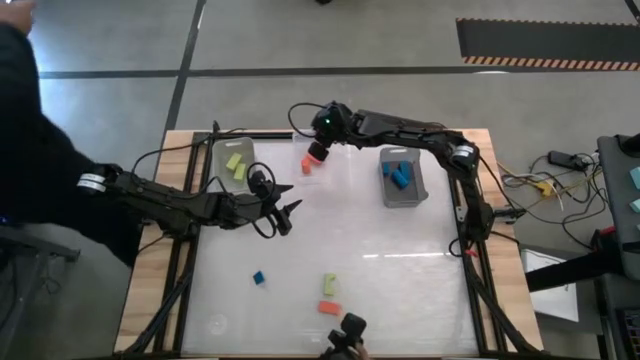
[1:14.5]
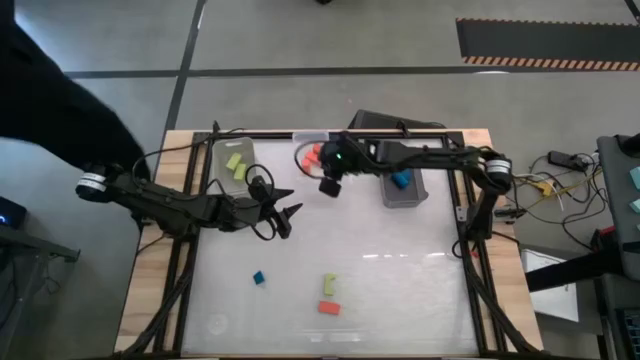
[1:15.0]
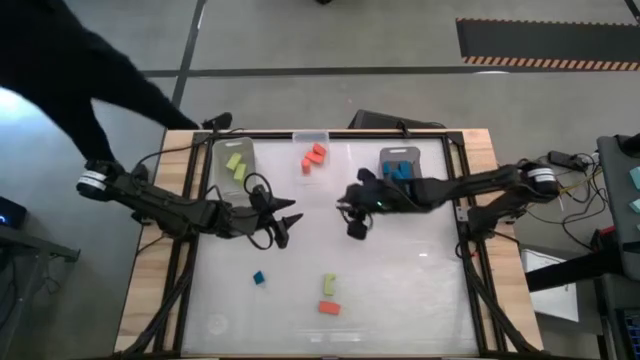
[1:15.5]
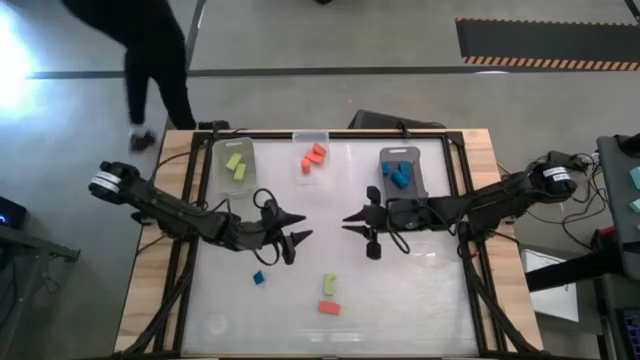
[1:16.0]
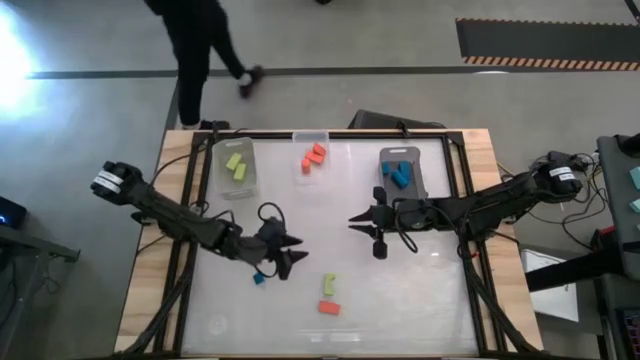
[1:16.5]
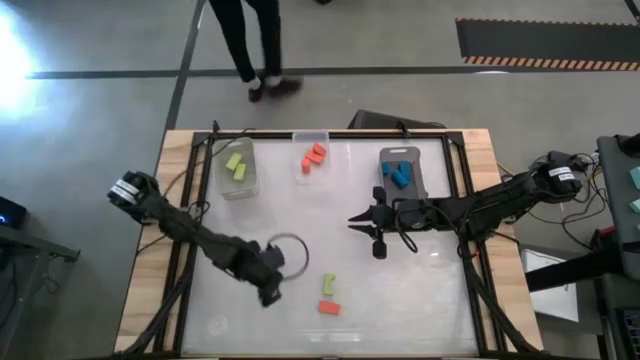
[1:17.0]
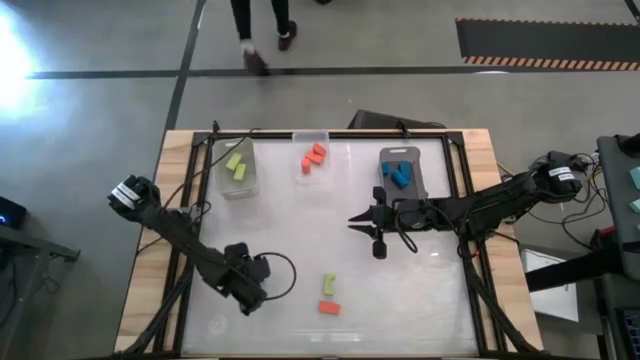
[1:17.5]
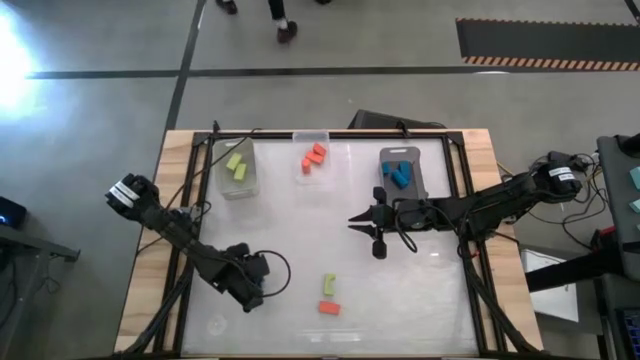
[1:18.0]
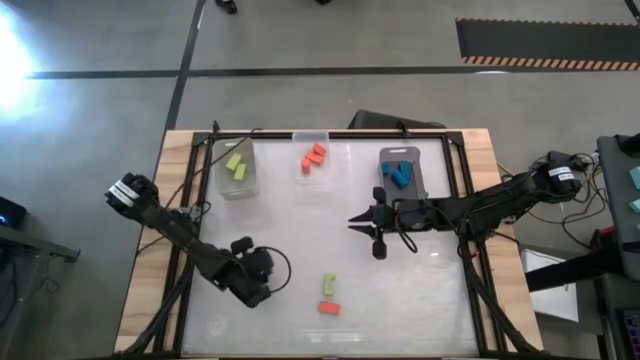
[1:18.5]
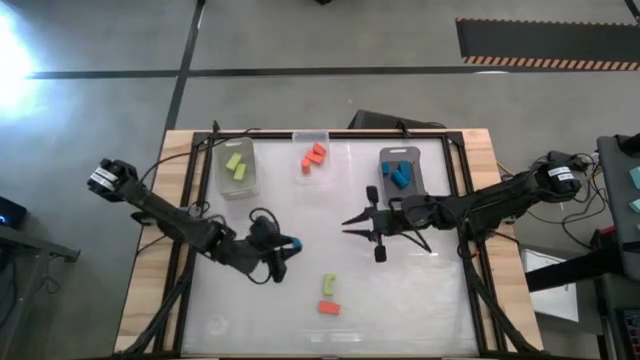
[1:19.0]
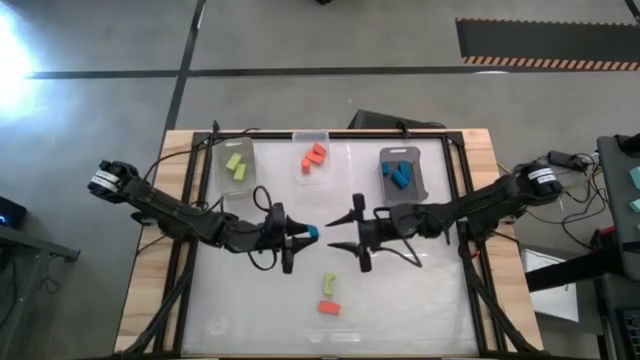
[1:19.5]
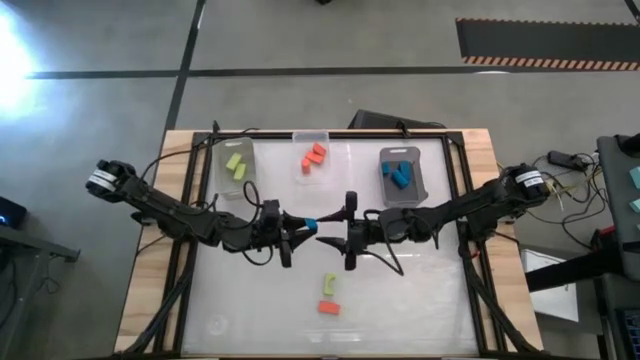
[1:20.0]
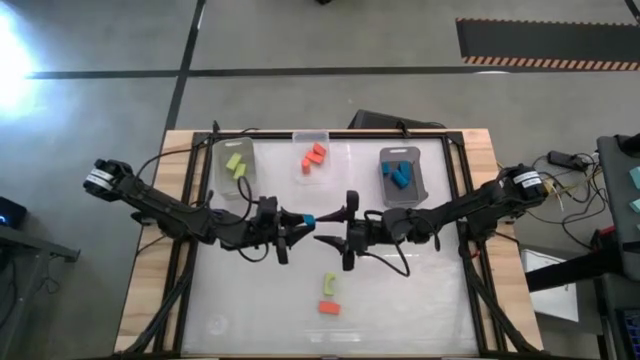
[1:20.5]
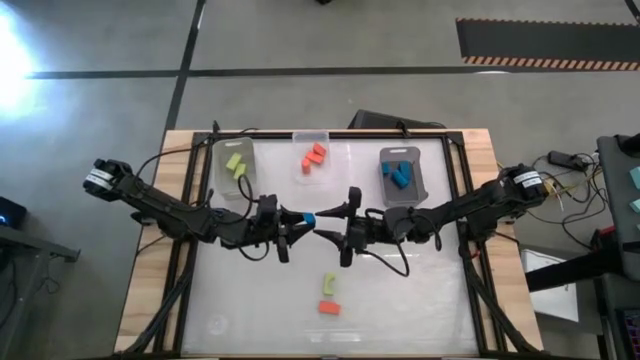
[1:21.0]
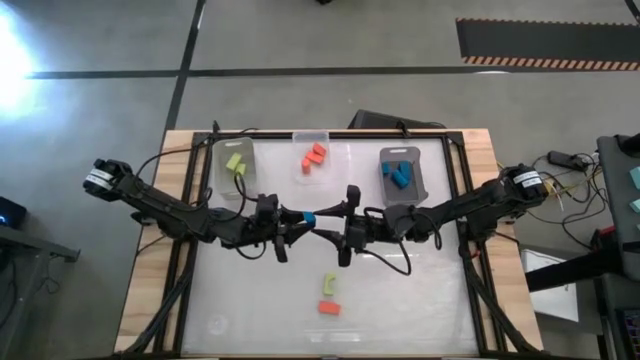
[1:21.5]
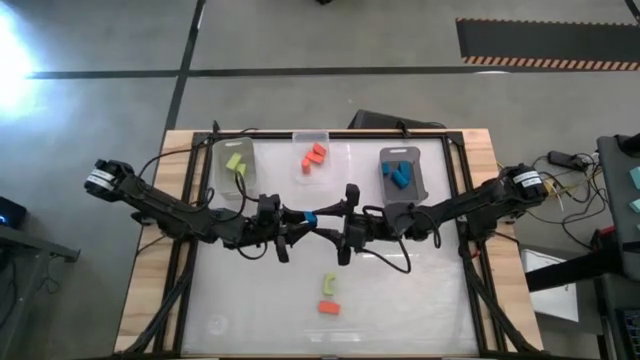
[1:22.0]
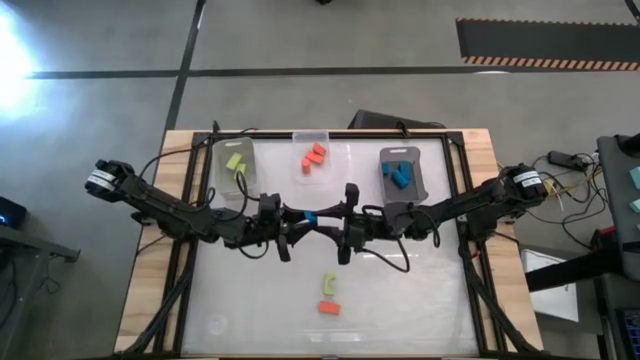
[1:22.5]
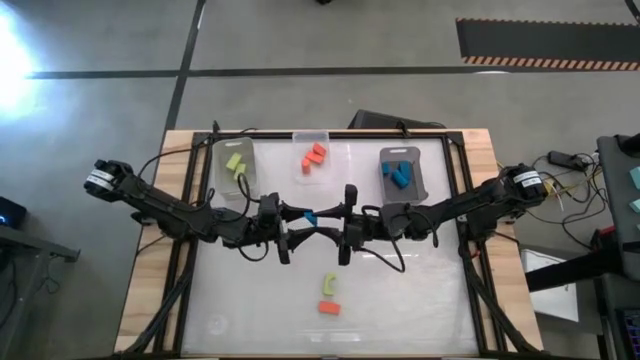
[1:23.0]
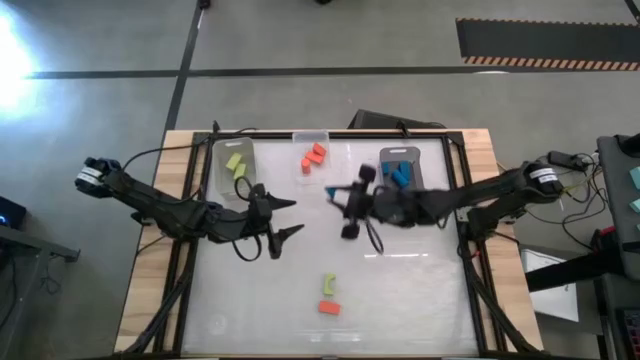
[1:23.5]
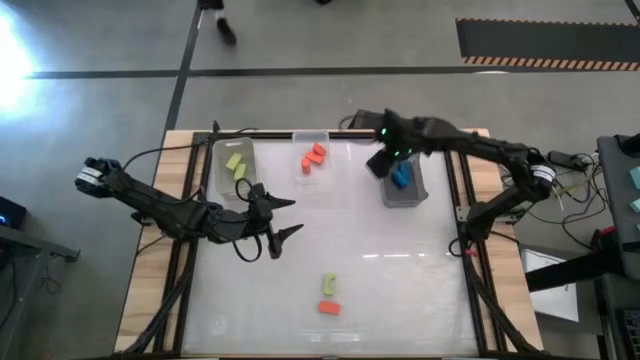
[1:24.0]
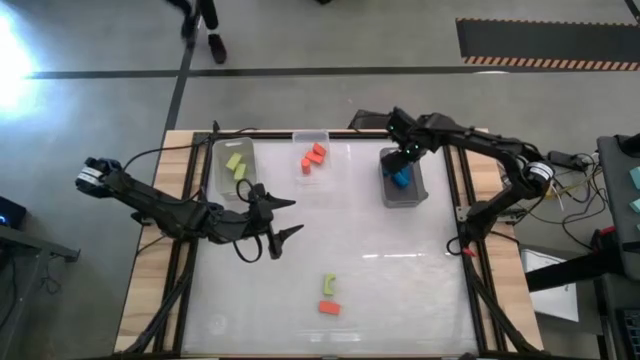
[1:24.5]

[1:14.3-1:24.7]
Task: Sort & place blocks by color
Put the blue block into the black bin

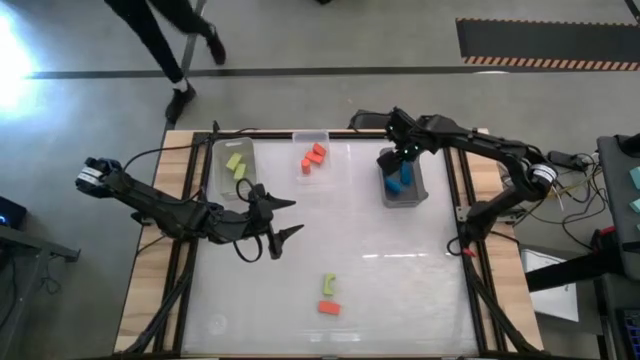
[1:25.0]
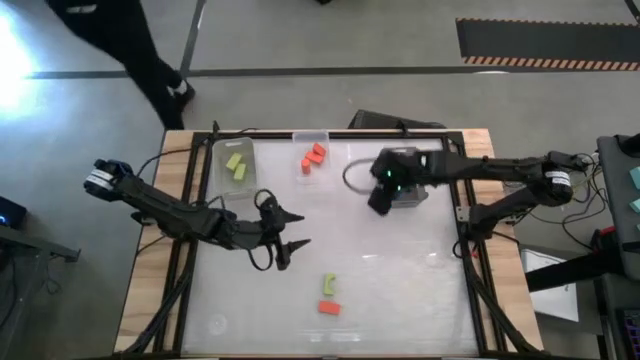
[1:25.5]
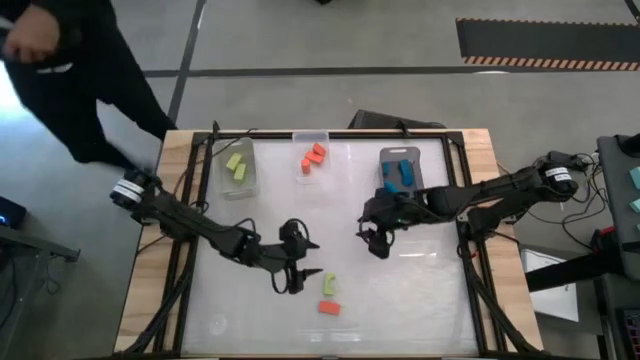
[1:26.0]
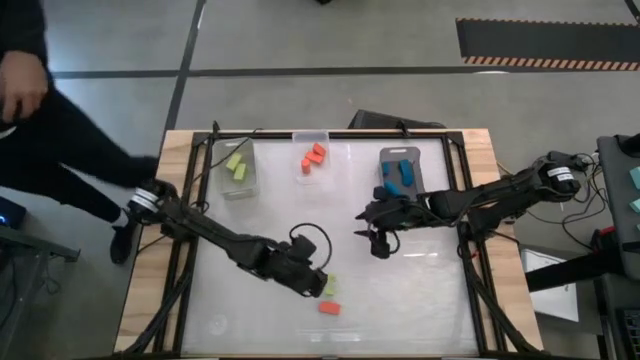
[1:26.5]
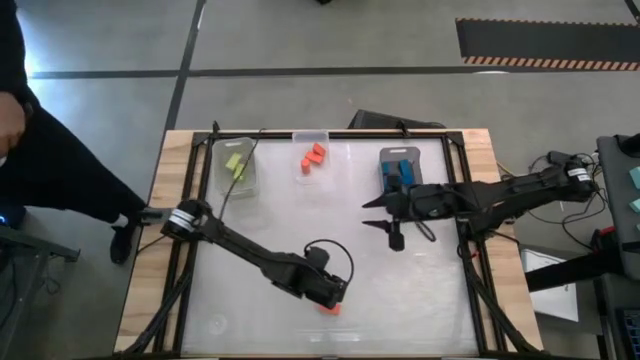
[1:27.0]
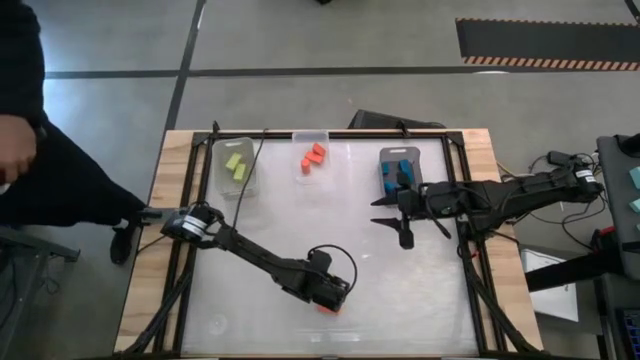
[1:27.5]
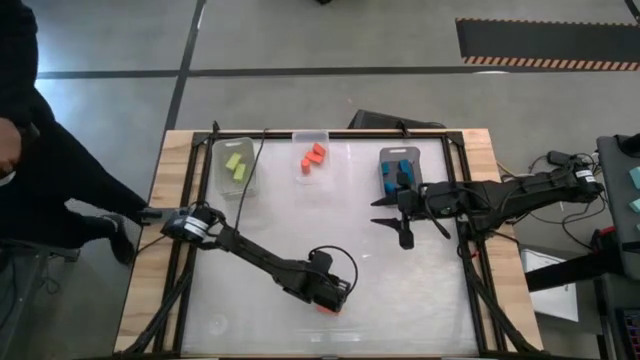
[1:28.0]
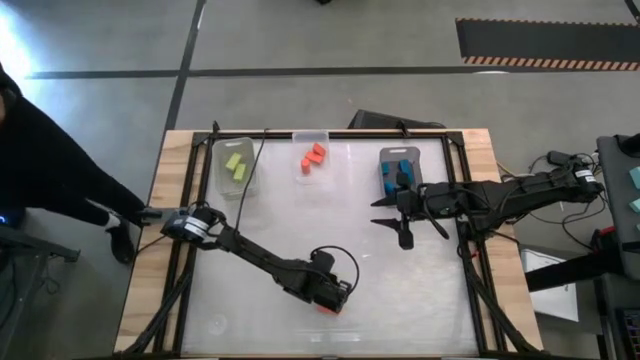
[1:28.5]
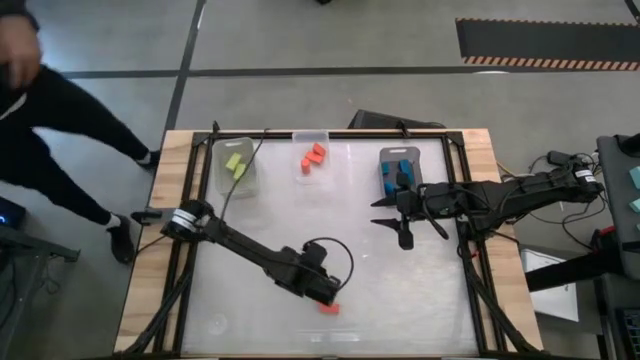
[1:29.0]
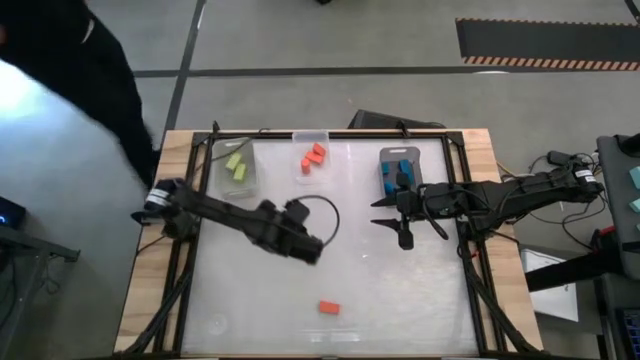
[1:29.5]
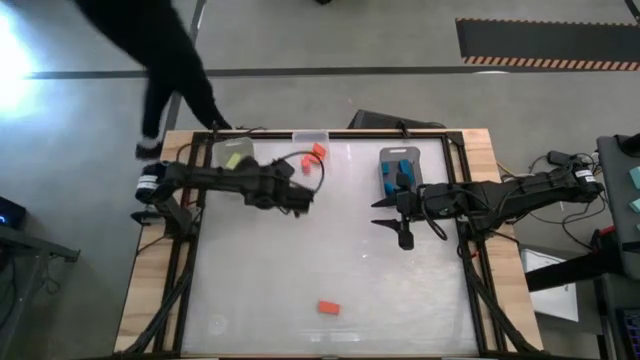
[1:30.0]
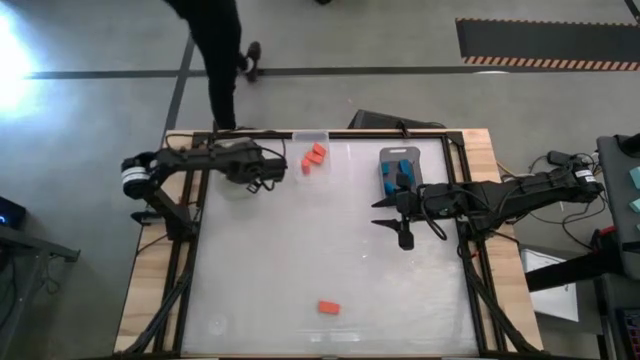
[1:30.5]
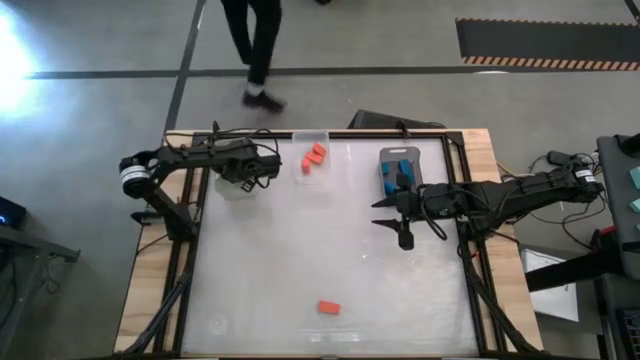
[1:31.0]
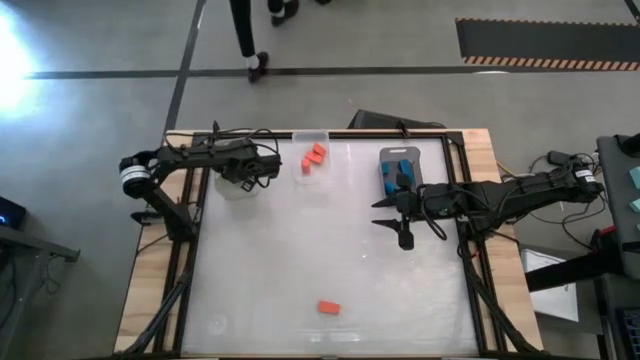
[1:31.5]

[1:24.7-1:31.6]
Put the green block into the white bin

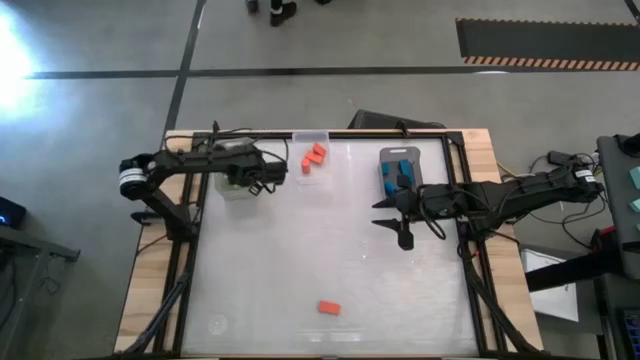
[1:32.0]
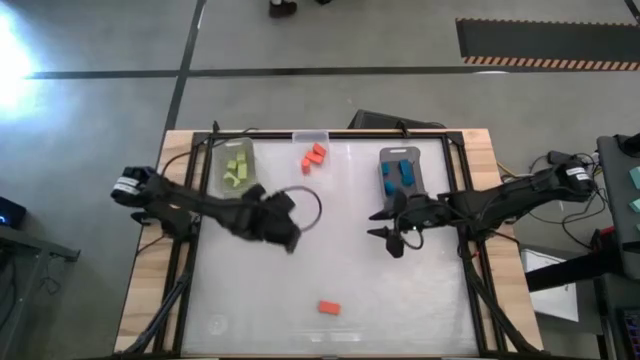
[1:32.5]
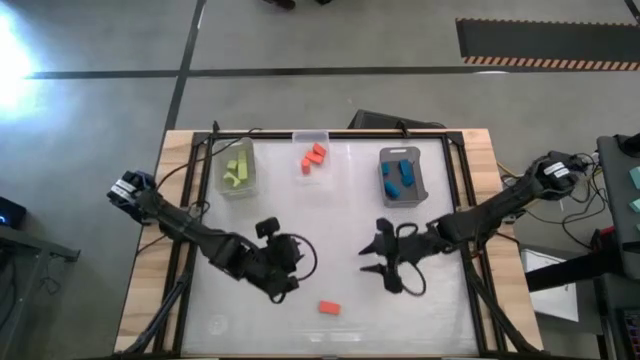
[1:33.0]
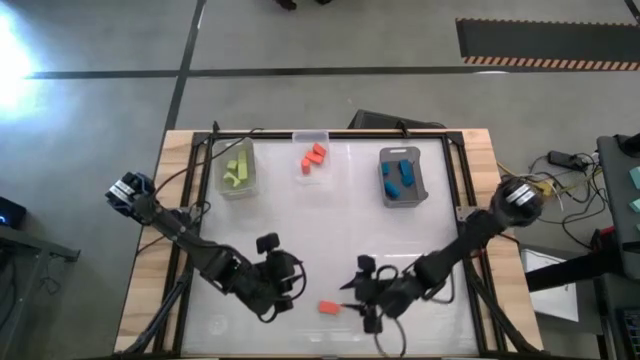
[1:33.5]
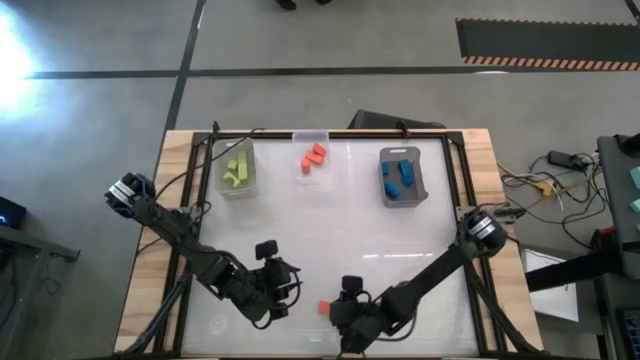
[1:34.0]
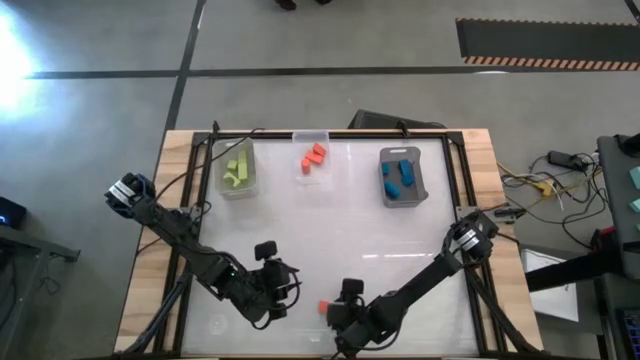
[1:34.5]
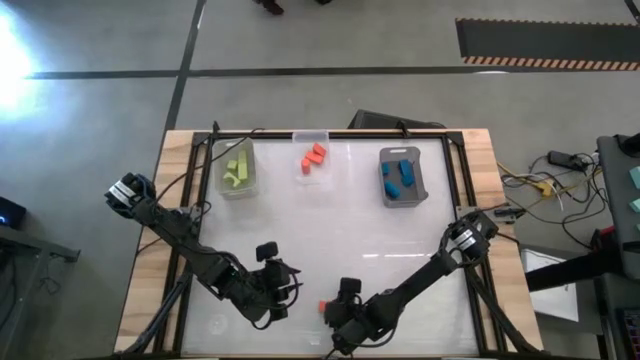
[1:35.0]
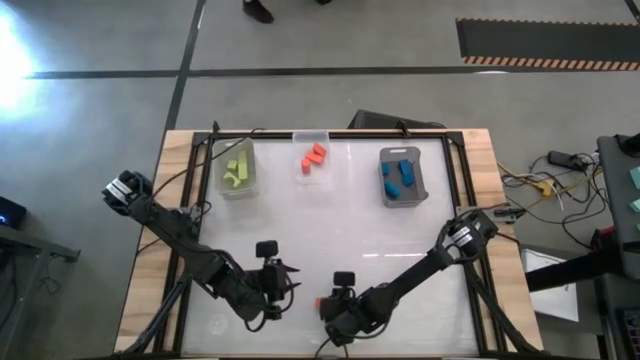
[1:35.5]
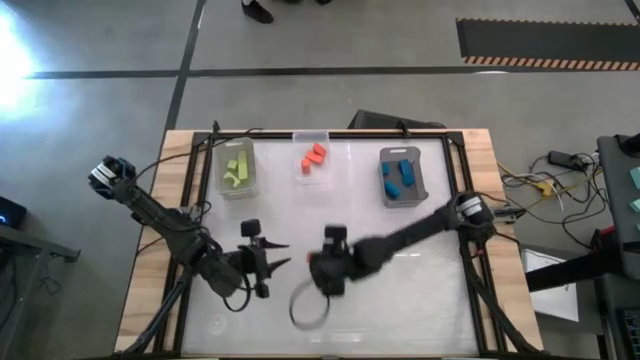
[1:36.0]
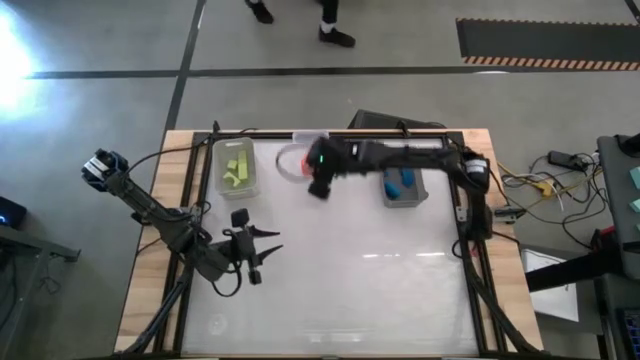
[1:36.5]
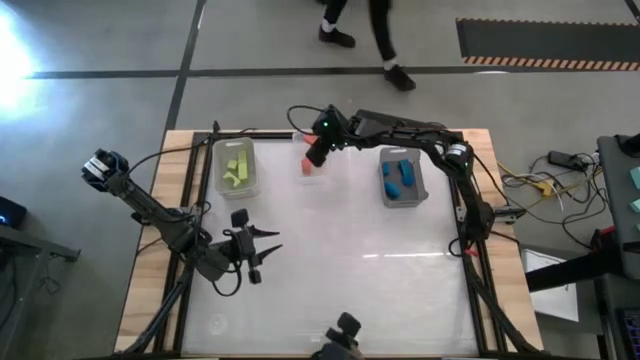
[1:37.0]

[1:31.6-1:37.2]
Put the orange block into the transparent bin
